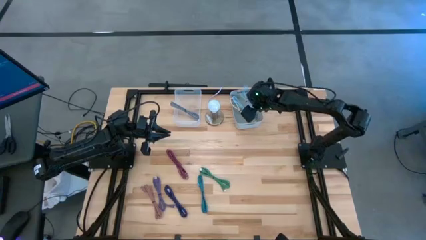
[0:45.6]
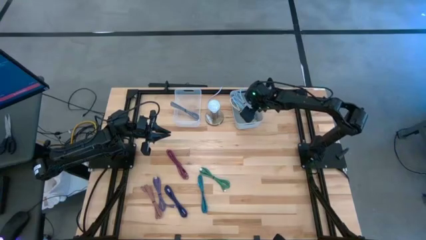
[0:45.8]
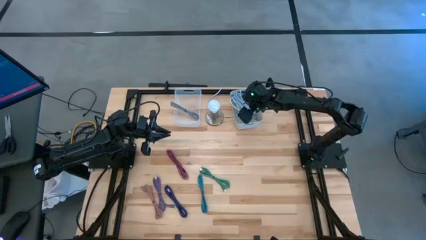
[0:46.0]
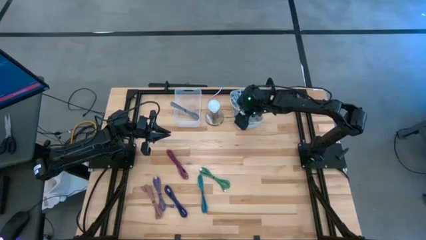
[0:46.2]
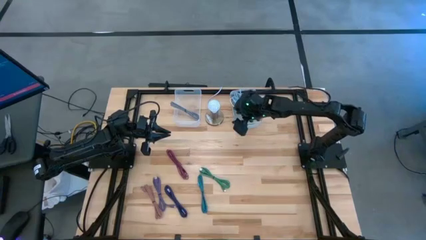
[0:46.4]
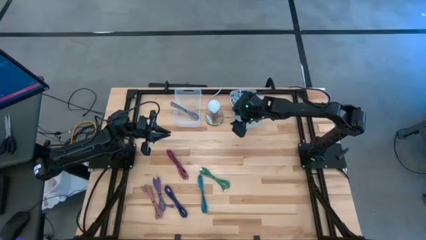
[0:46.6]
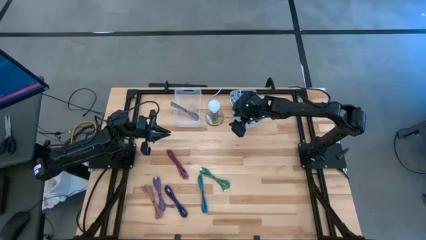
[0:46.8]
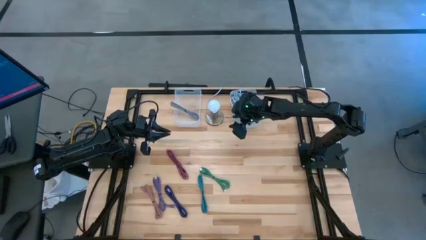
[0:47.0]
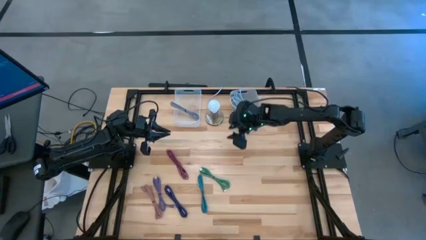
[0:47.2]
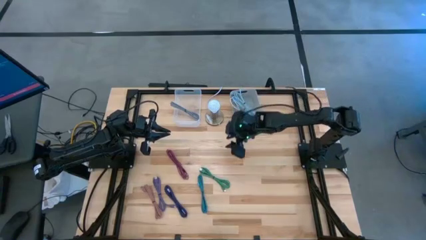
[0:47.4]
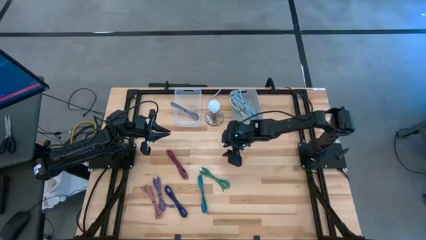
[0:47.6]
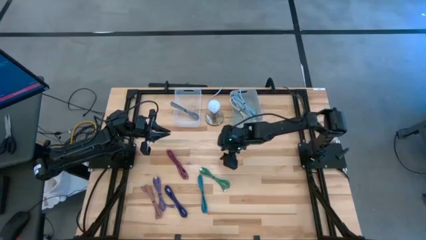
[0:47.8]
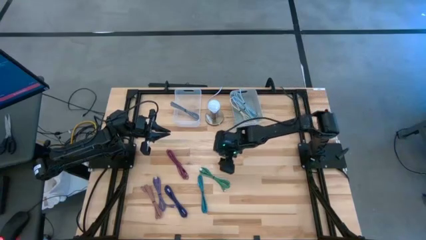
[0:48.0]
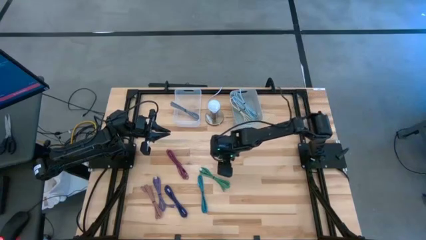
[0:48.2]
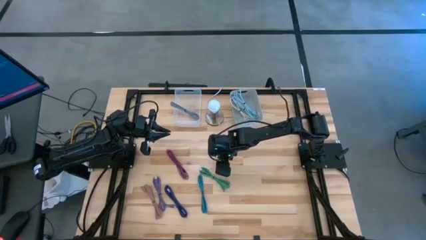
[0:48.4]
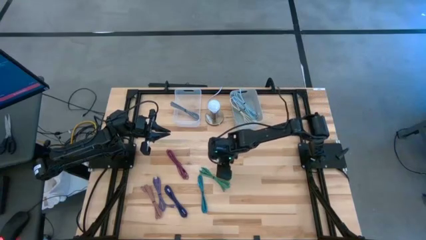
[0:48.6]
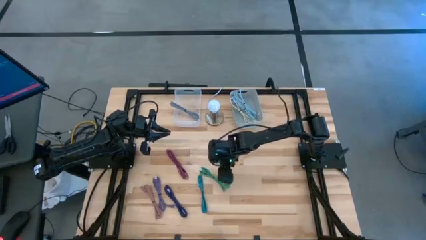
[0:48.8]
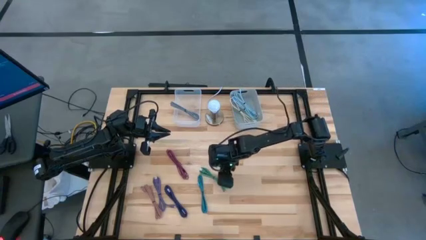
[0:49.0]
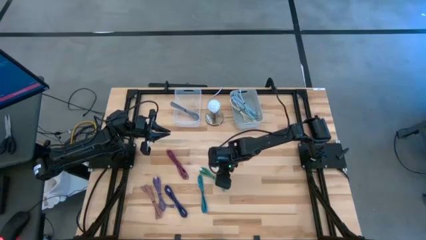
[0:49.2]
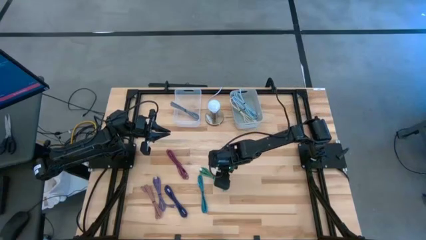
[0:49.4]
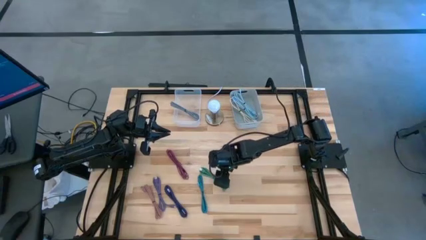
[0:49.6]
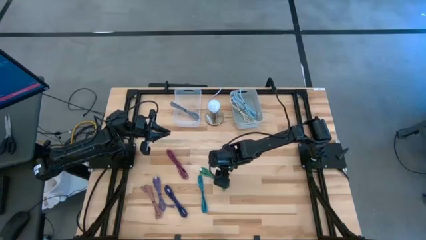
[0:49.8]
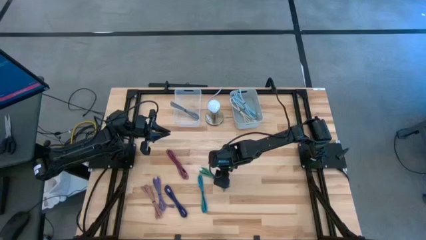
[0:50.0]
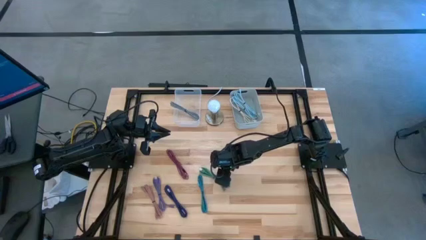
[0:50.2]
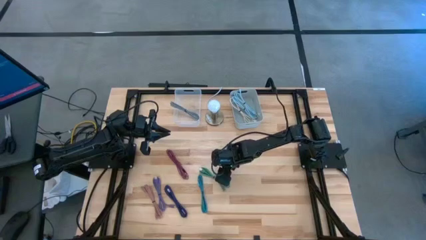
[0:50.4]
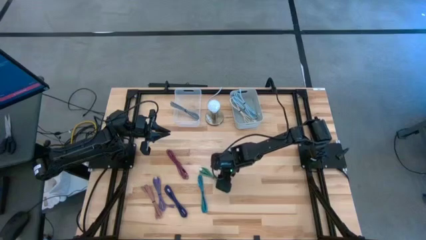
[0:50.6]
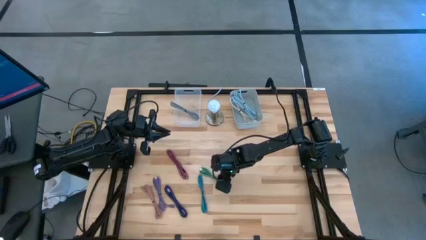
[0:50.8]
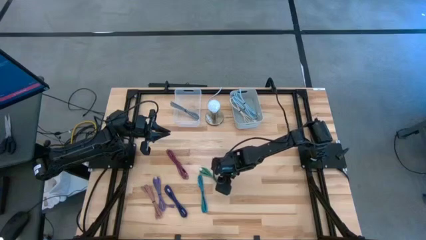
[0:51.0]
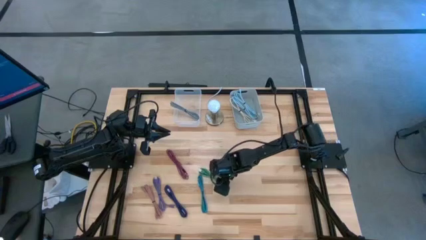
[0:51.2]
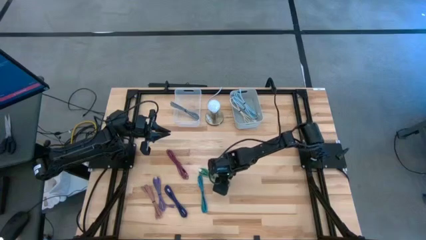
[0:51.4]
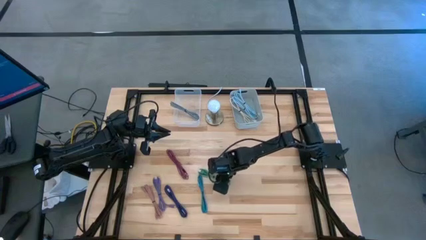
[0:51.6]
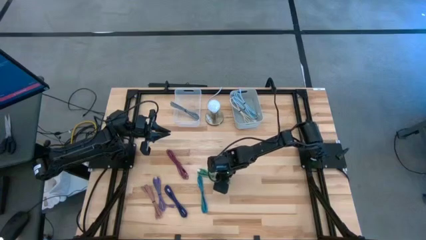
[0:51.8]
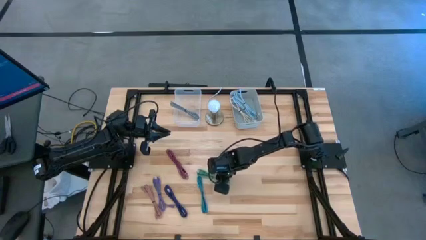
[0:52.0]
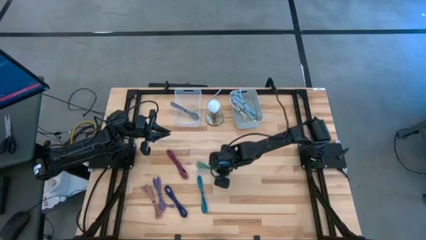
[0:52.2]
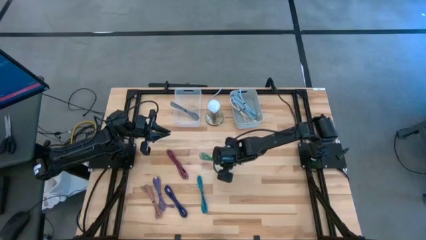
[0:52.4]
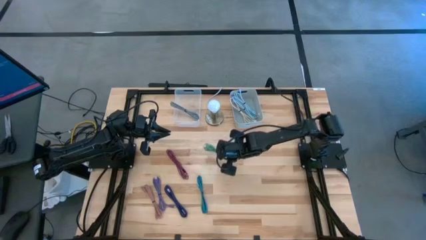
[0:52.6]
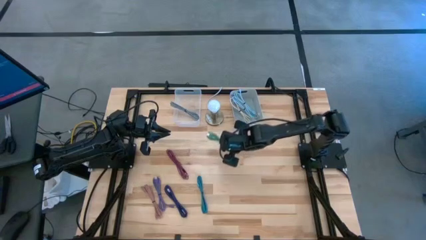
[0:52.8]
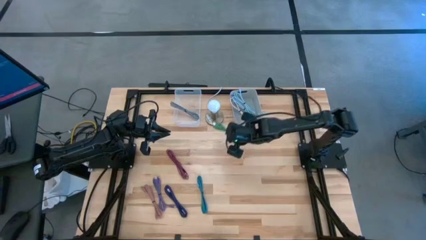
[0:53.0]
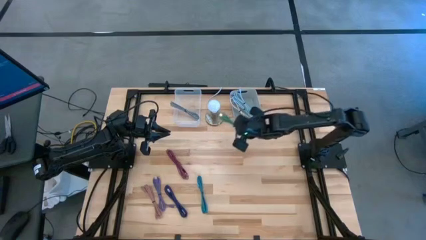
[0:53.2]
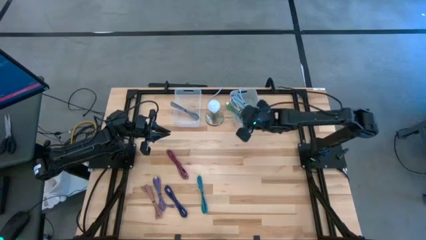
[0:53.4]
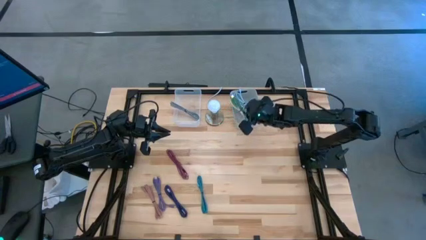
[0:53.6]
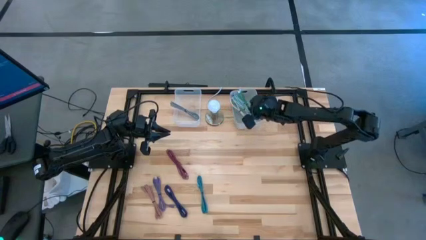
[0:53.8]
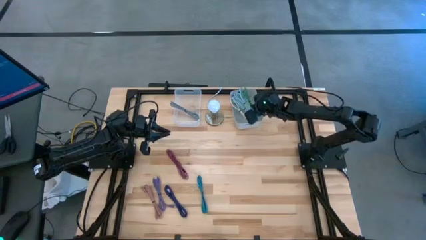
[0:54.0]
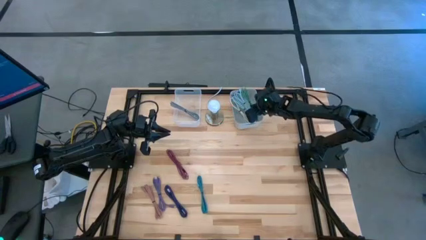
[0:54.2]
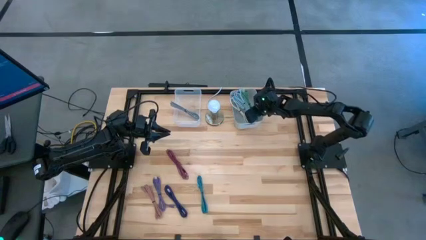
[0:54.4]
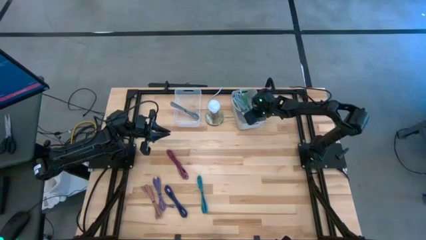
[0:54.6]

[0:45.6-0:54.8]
Task: Pick & Place USB Port
Put the green charger cable into the gray bin

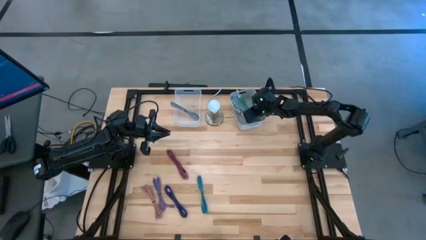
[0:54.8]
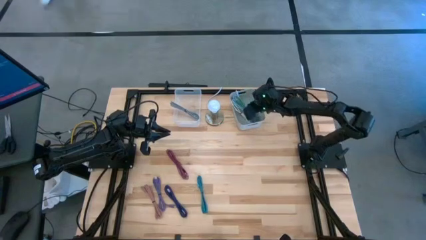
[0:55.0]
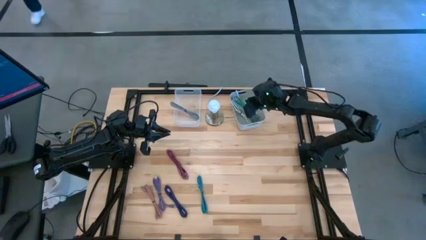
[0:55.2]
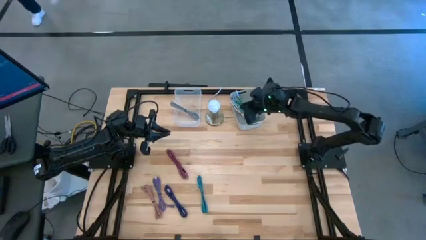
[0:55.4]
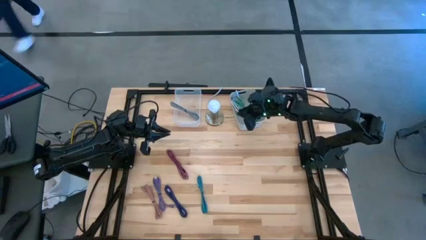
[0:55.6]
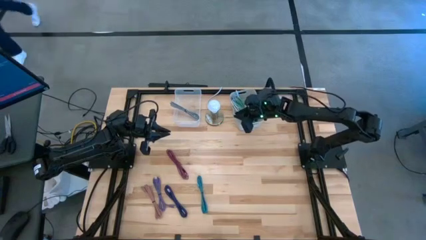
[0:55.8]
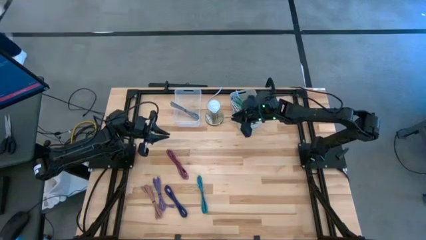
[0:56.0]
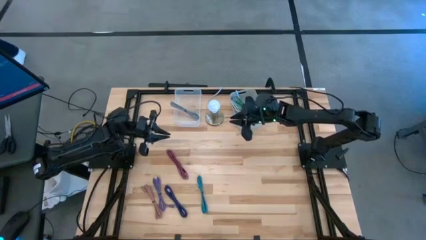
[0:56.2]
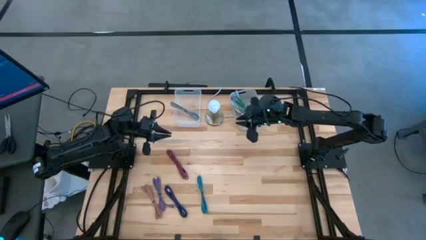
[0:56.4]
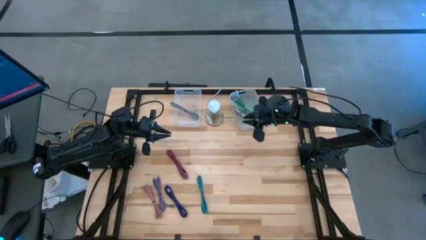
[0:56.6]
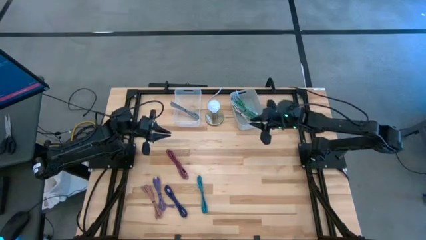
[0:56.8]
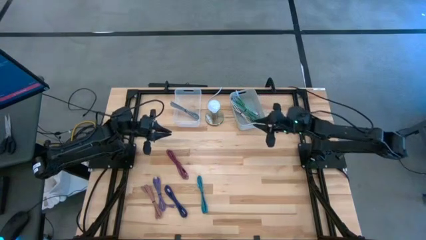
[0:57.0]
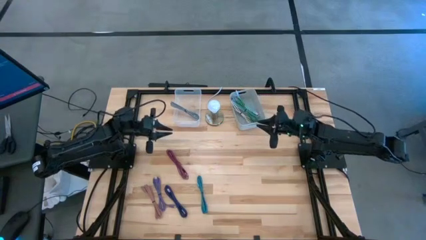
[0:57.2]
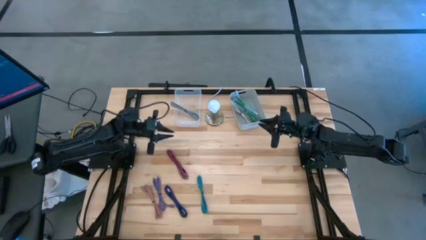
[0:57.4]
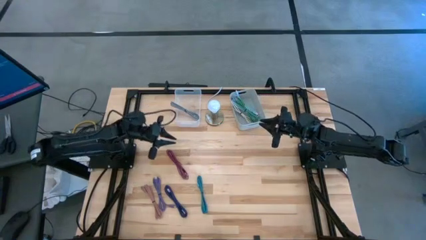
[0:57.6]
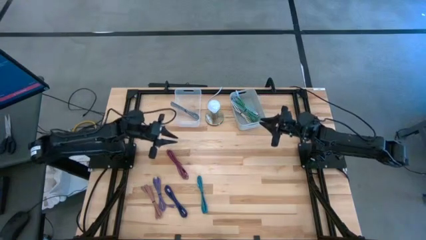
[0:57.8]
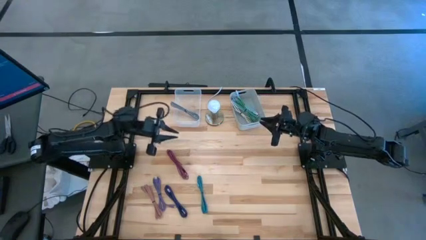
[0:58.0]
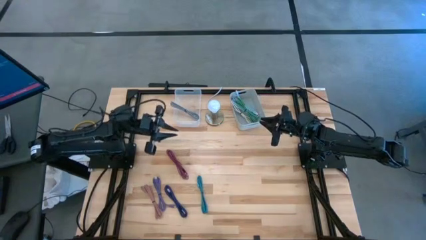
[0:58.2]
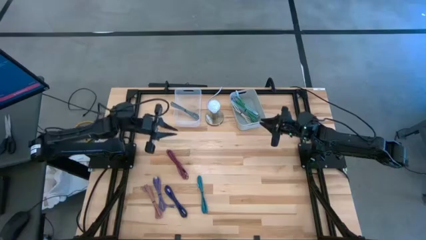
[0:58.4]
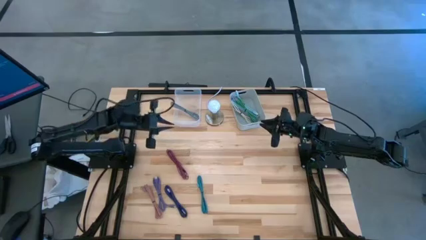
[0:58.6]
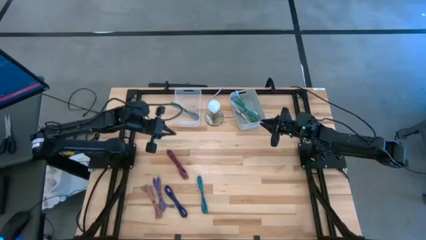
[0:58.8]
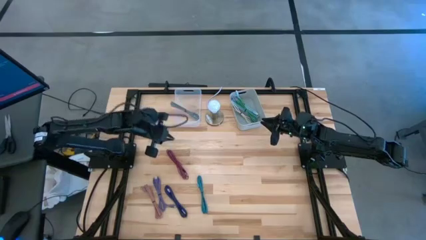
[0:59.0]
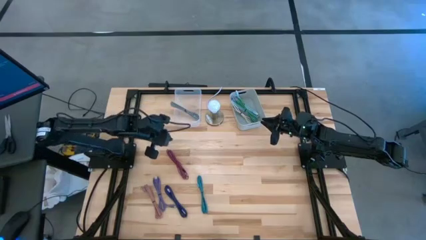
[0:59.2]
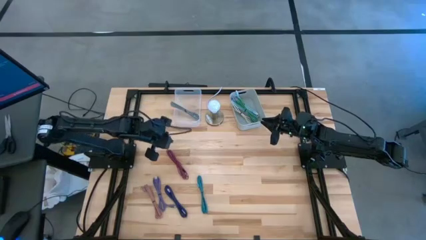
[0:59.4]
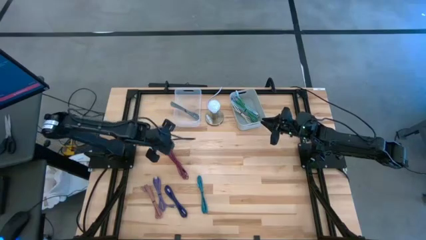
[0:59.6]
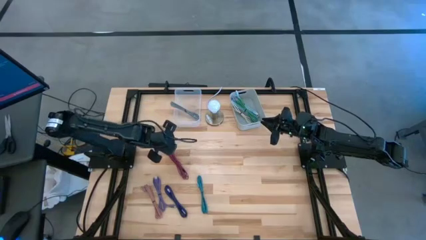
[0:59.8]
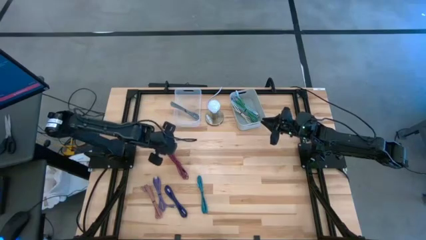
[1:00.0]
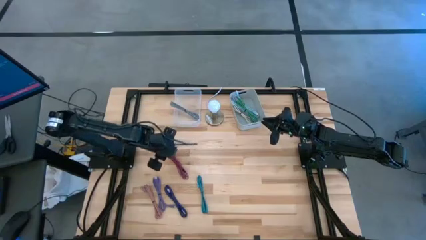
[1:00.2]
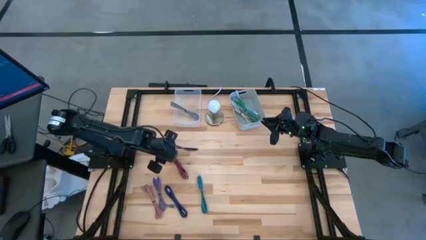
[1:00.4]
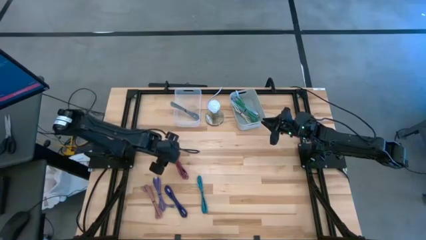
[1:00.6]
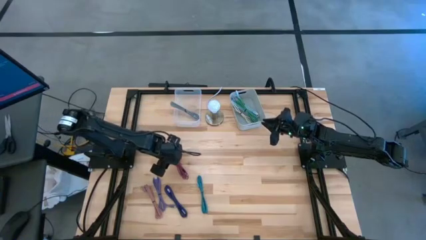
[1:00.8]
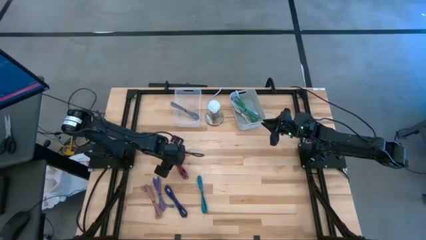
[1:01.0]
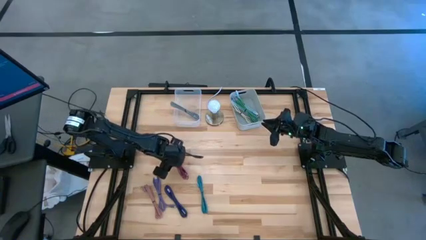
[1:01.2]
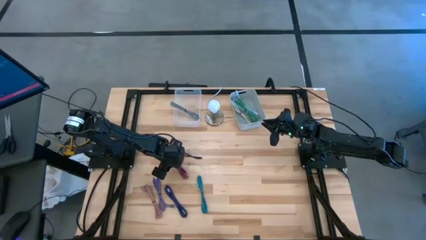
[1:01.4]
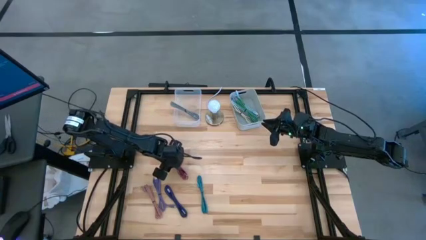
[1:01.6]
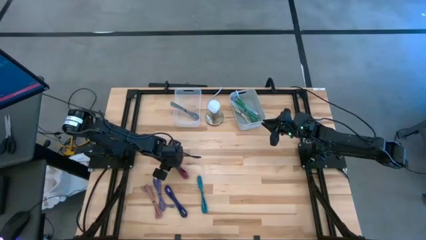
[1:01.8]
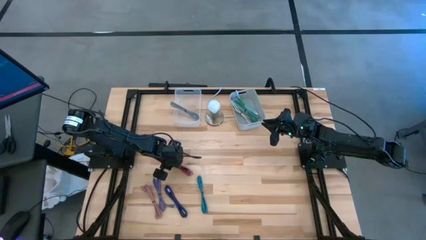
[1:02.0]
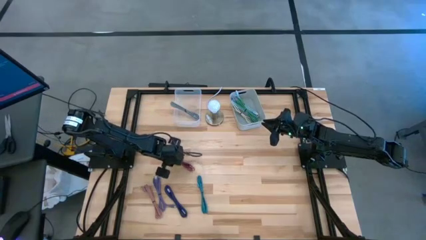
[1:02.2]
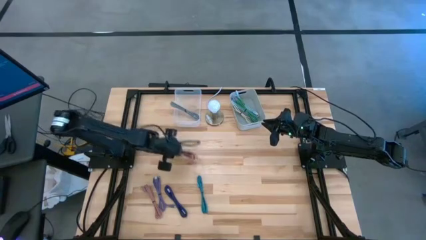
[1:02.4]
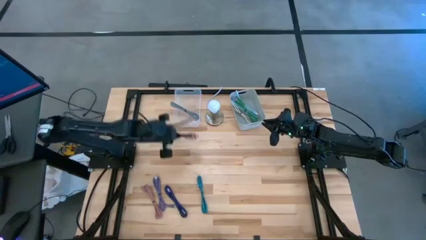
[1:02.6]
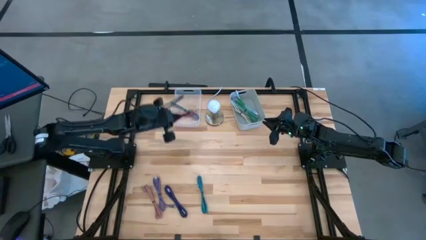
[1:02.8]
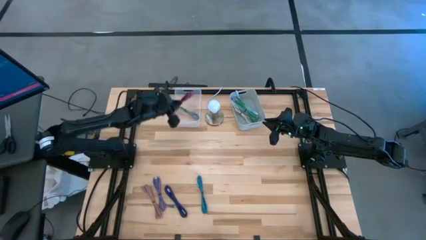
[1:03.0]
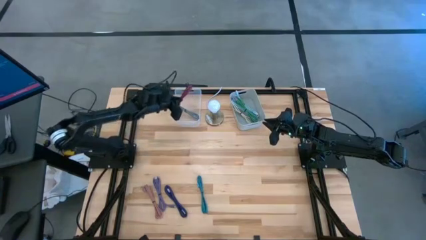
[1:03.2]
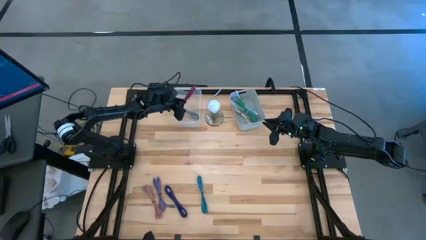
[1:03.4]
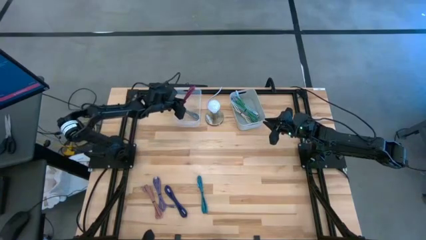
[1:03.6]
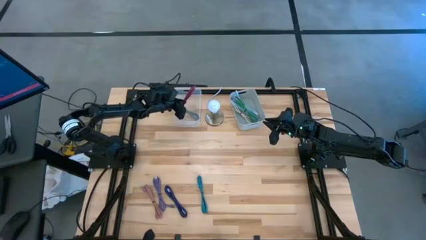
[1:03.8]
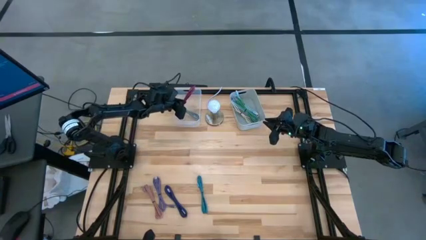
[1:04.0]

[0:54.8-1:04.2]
Put the pink black charger cable into the transparent bin
